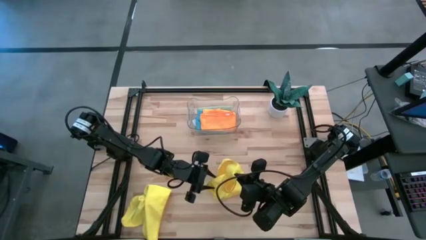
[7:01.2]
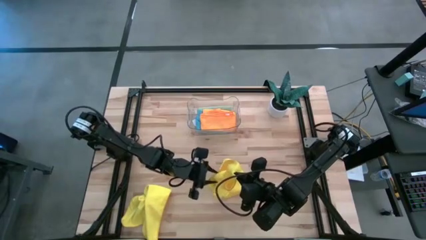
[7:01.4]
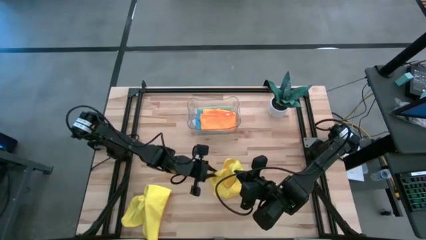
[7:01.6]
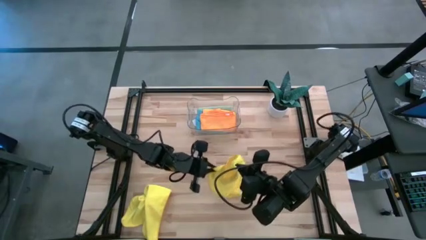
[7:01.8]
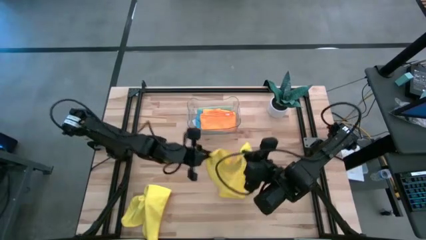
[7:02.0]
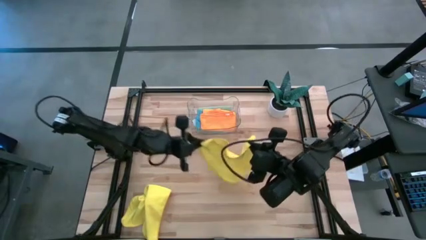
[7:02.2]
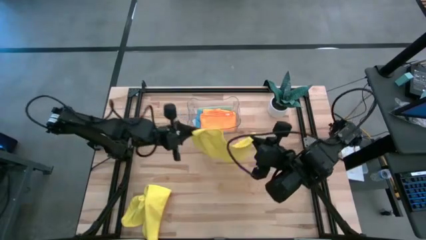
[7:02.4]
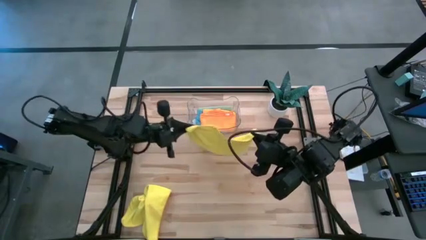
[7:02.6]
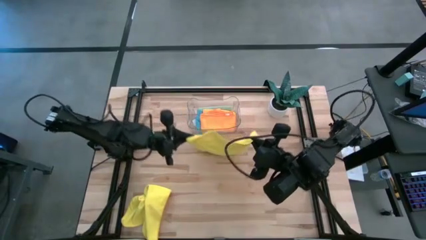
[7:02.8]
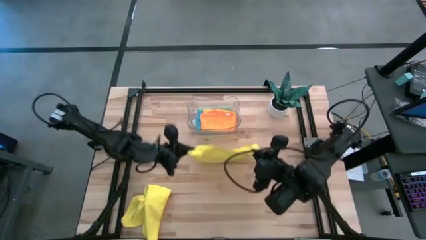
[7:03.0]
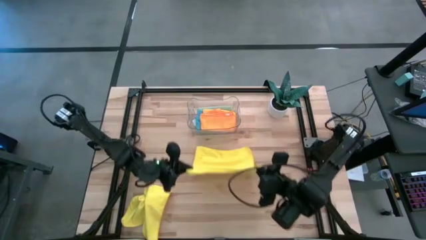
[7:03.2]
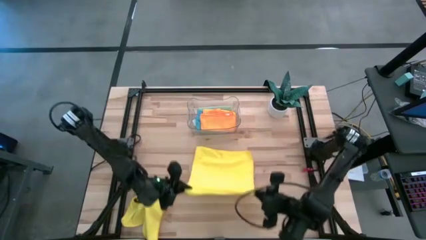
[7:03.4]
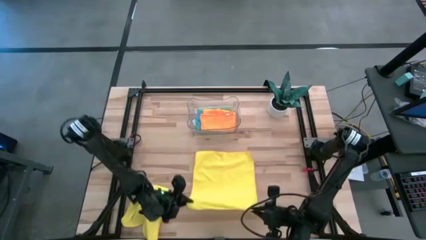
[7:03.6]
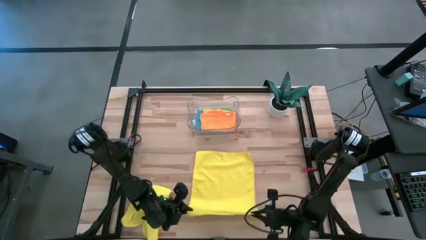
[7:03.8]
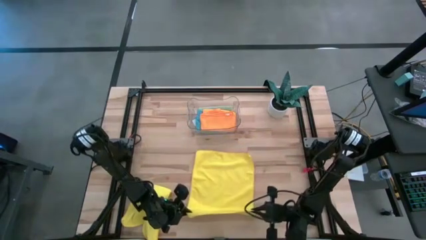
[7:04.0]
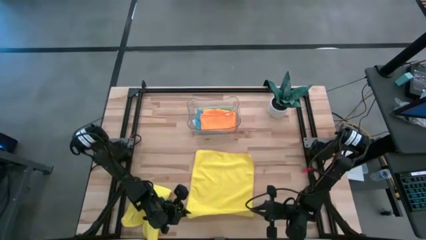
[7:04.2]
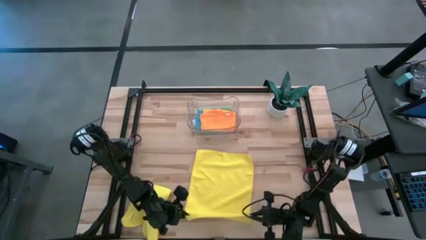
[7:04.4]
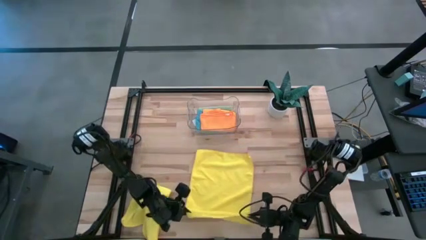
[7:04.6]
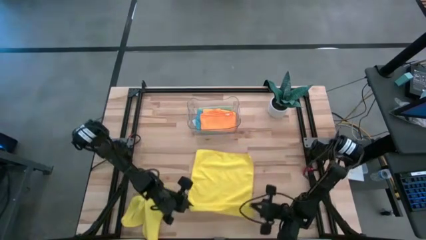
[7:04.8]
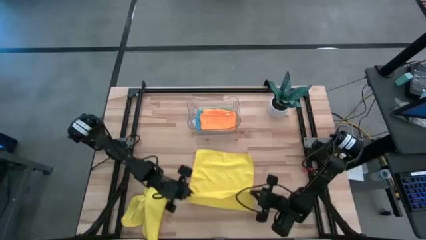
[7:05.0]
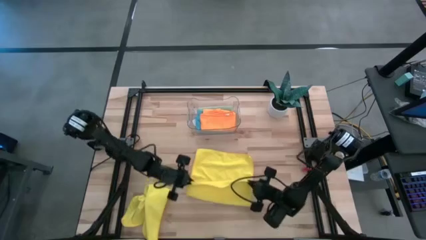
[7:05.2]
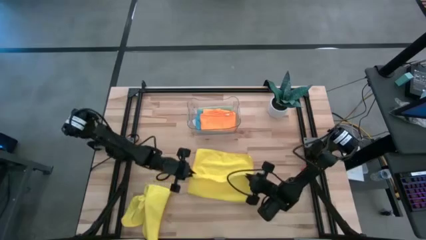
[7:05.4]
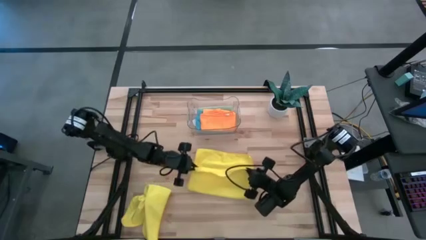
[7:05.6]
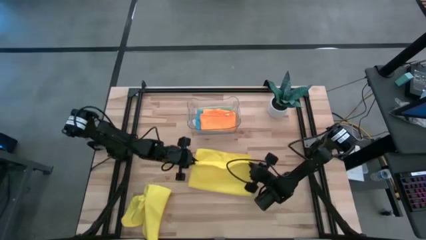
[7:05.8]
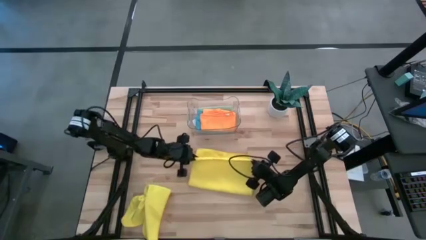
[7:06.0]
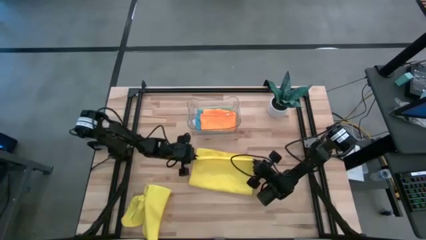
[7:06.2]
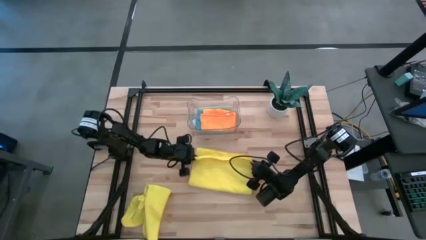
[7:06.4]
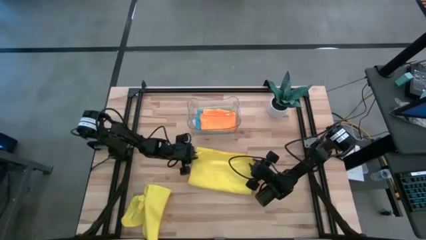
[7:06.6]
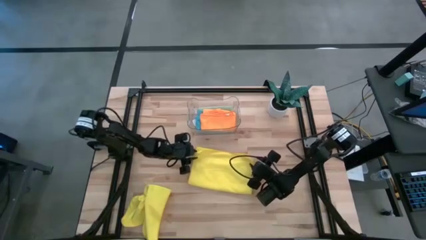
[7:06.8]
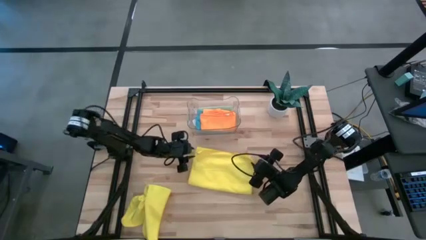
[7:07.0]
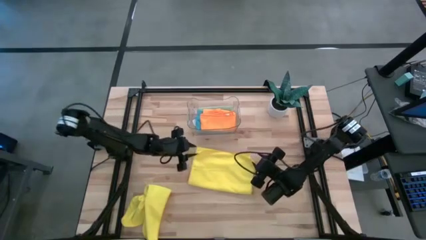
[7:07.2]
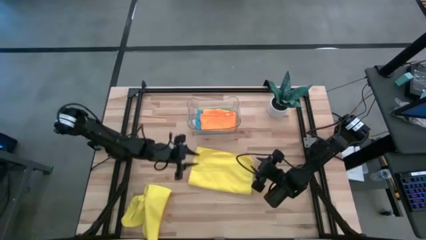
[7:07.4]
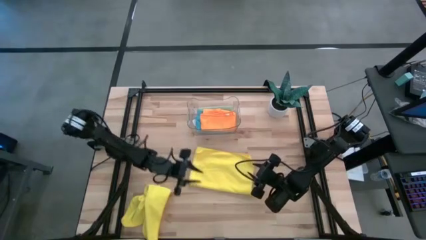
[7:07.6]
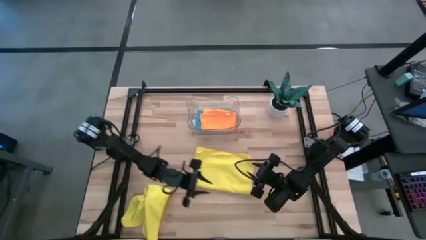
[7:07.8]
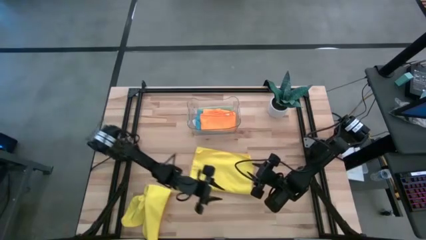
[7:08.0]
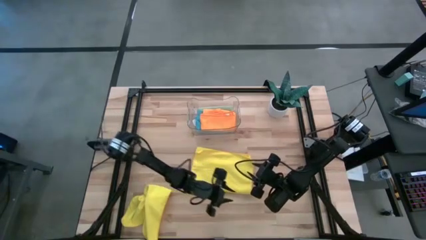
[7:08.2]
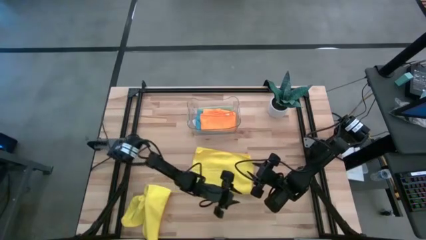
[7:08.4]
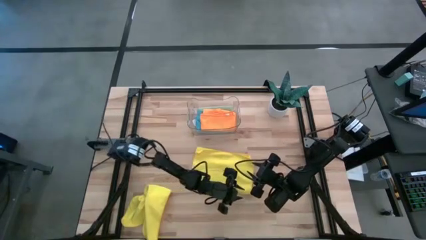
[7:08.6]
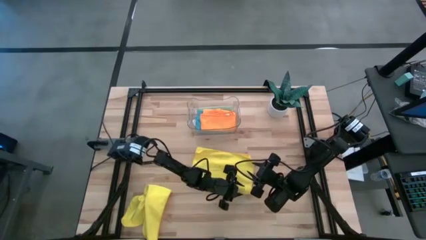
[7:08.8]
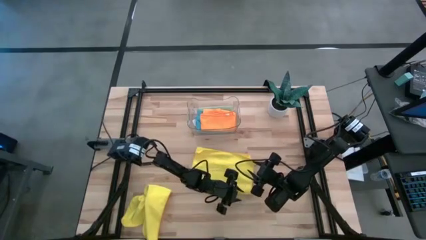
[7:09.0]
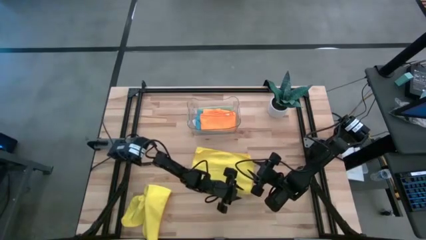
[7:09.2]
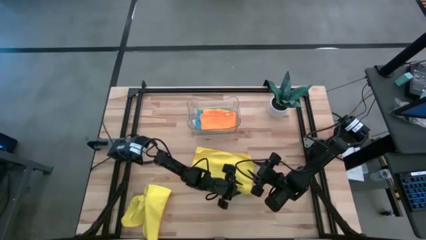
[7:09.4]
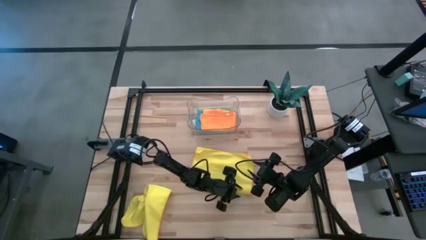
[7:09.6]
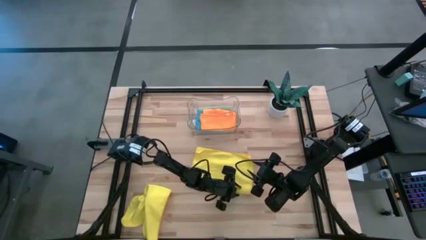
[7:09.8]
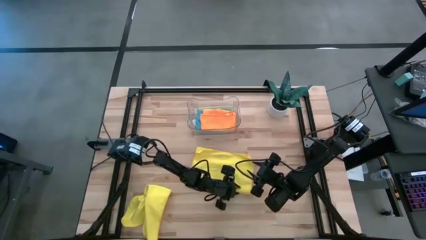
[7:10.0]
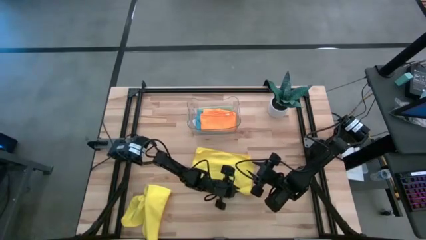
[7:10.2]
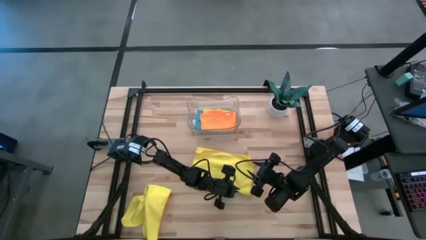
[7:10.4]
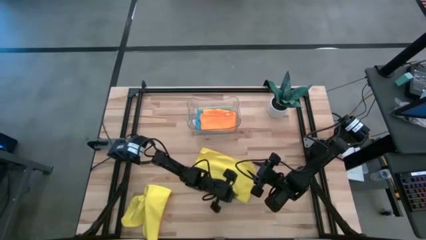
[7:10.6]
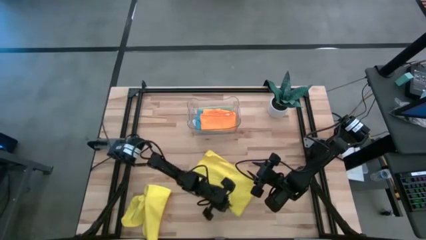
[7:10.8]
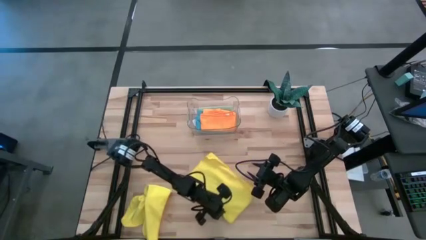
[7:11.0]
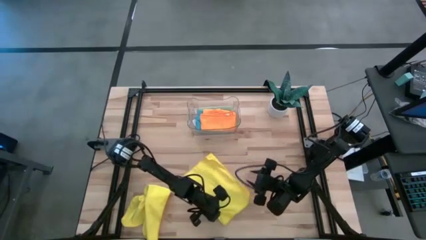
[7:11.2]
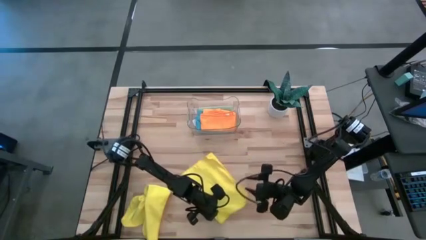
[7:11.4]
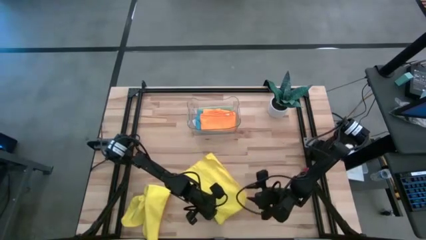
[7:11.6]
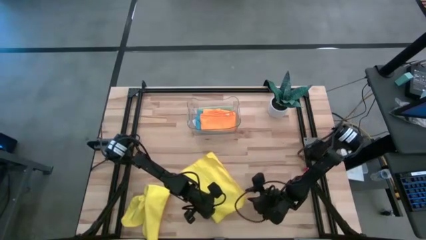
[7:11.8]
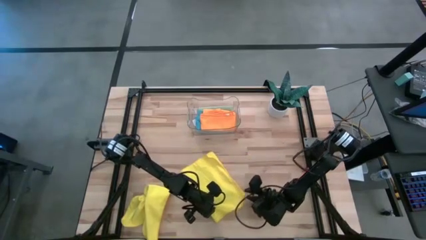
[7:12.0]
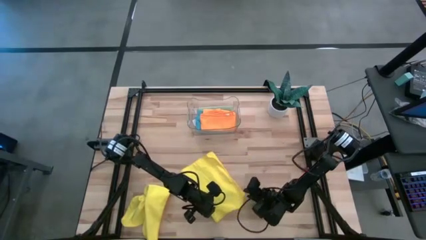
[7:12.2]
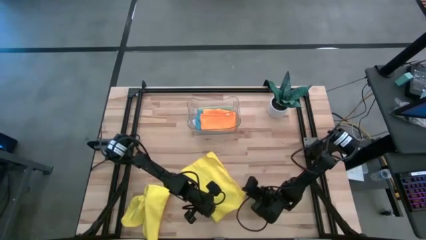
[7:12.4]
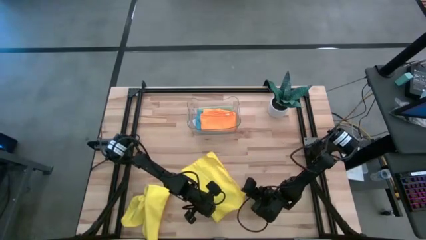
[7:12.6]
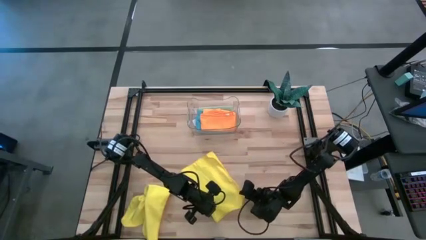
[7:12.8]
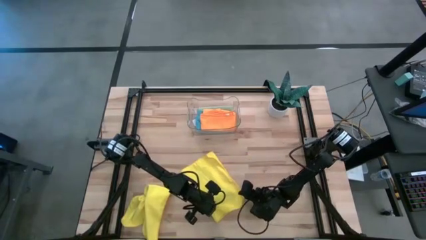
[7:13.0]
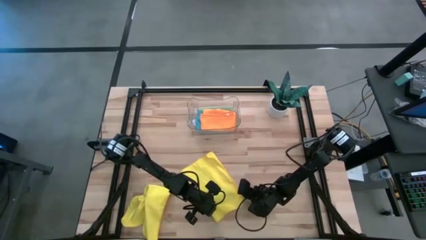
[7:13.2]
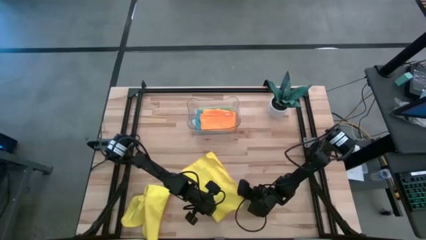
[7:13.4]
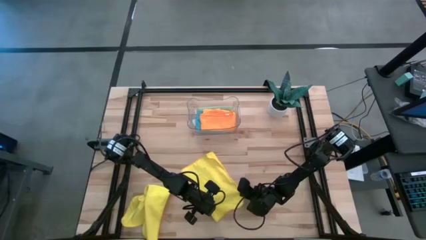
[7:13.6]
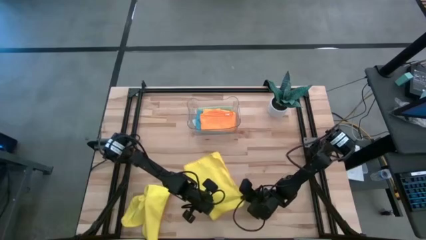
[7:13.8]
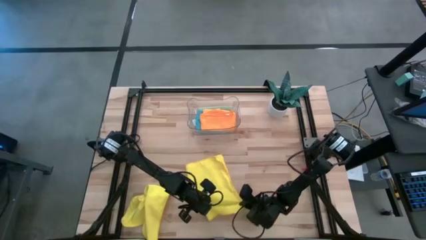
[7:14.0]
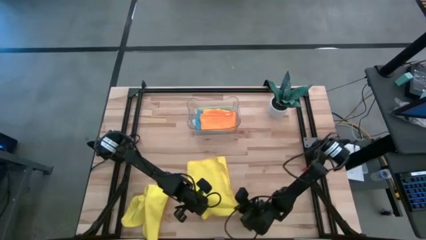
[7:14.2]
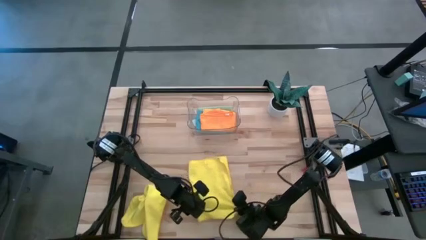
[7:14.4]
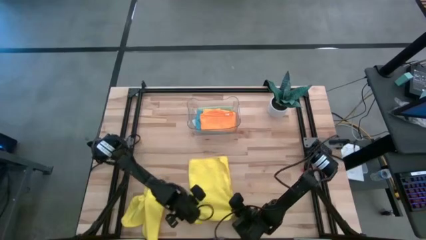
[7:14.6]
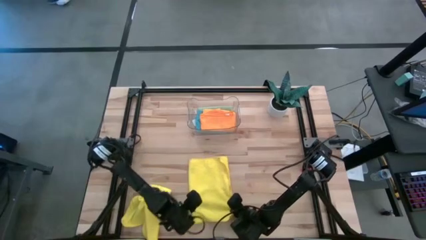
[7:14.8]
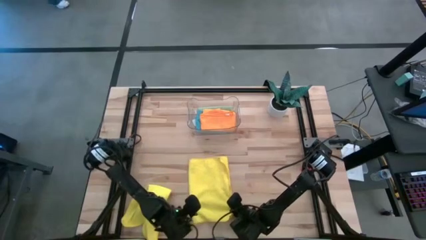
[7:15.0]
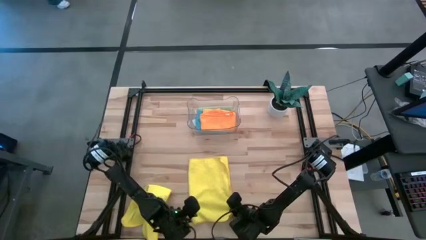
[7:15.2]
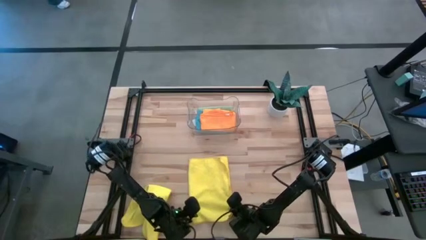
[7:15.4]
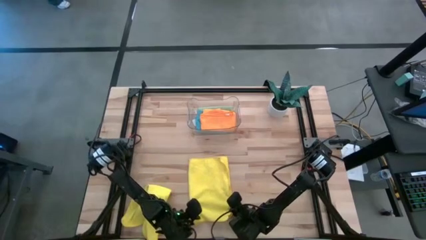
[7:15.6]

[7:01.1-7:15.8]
Task: Fold microfiber towels
Fold the top yellow towel

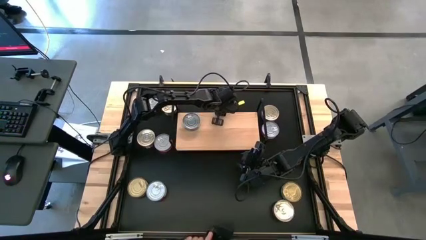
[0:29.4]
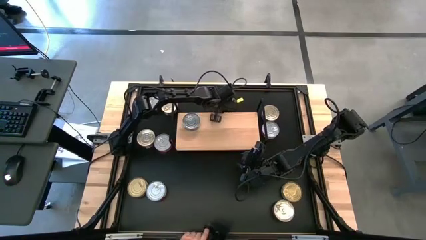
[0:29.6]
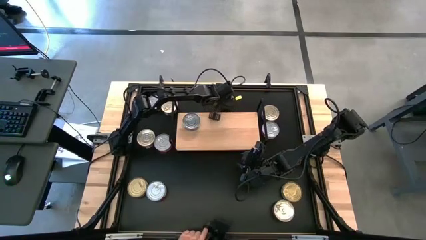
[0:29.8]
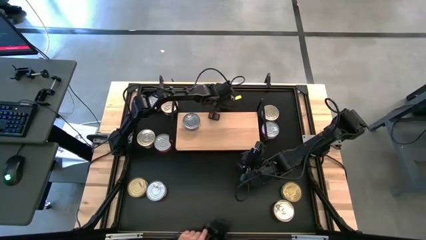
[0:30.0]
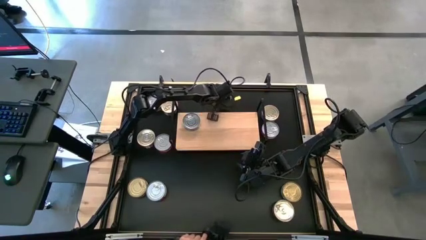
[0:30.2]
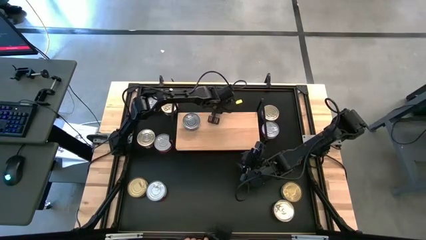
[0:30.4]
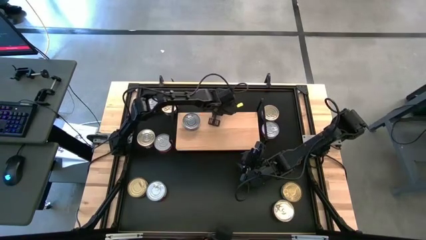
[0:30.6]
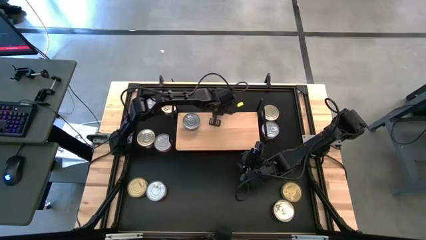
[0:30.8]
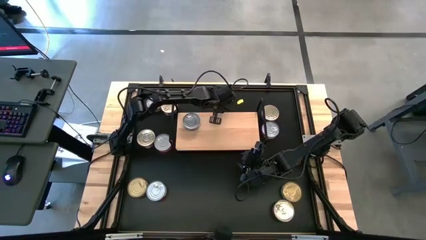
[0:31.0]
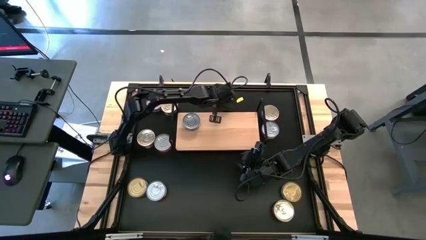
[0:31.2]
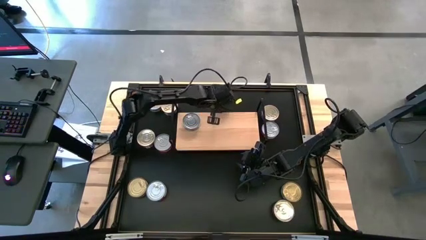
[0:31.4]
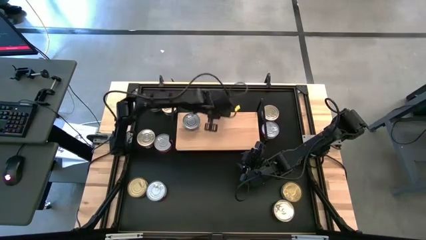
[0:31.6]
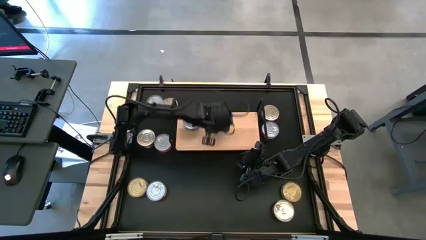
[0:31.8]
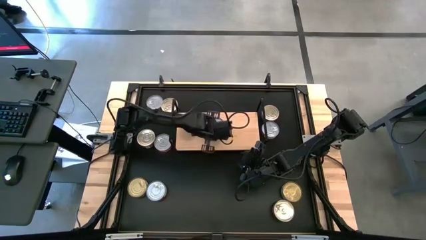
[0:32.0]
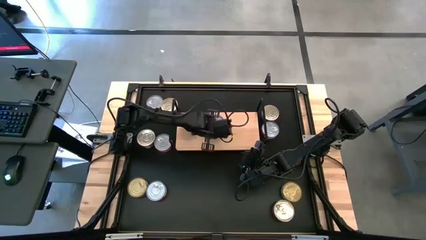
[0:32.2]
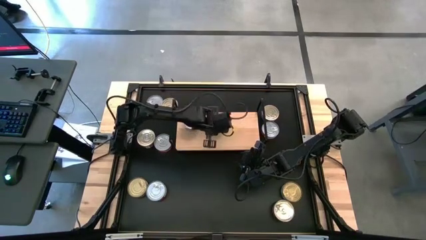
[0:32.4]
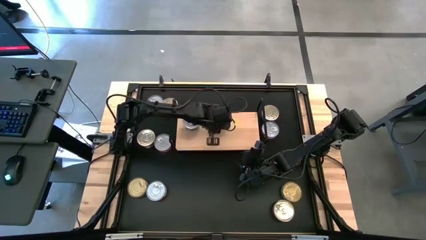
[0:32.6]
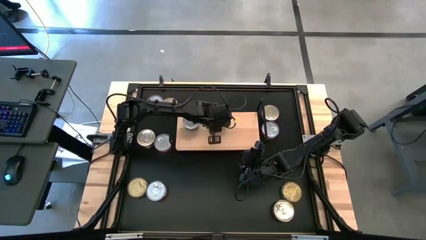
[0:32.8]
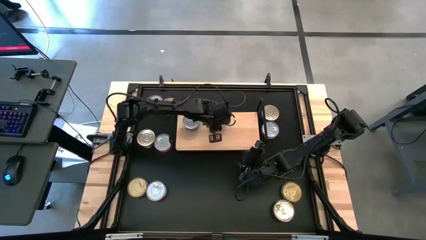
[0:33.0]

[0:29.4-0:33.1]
Task: Stack canned seafood by type on shelf
Put the red tuna can on the shelf
